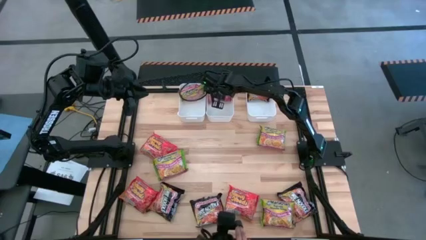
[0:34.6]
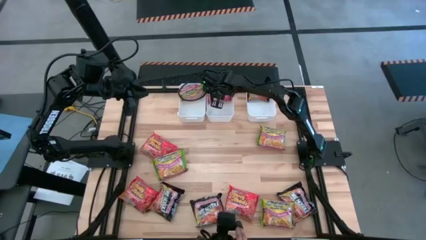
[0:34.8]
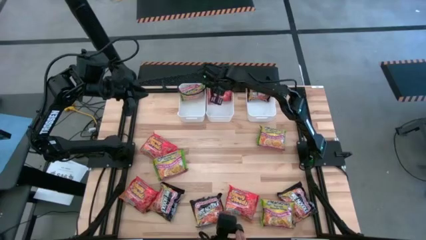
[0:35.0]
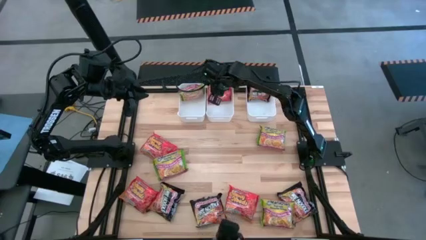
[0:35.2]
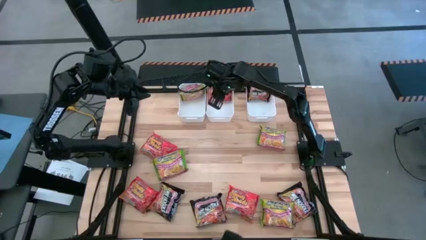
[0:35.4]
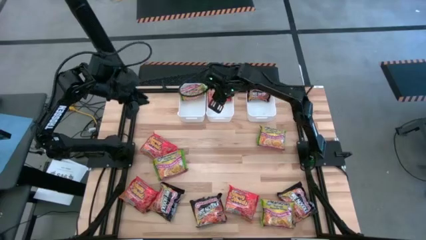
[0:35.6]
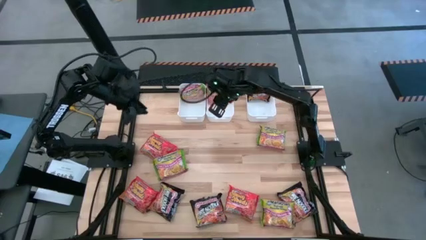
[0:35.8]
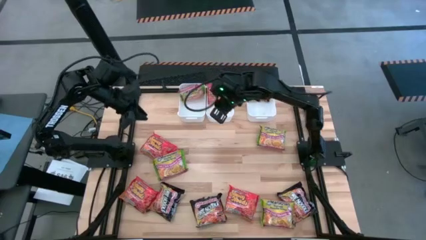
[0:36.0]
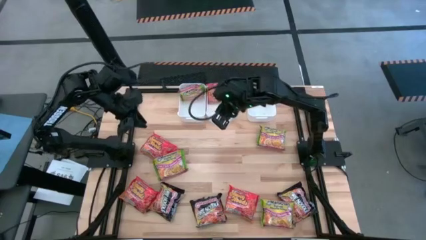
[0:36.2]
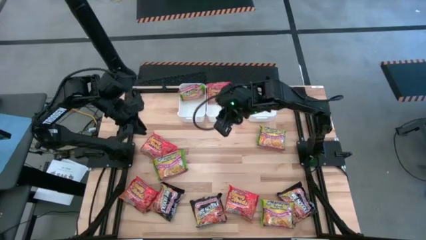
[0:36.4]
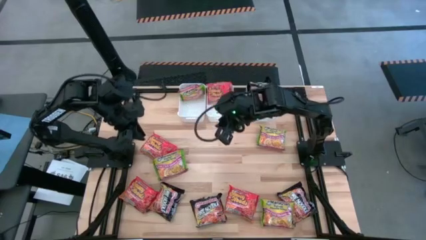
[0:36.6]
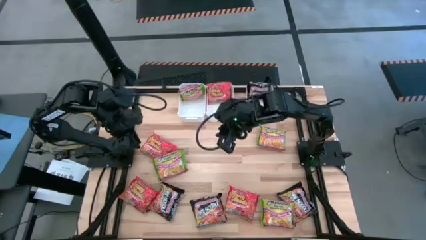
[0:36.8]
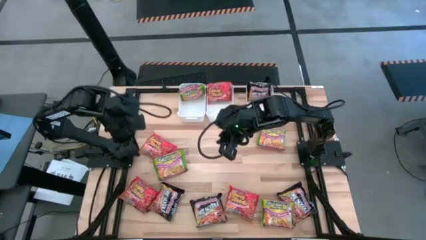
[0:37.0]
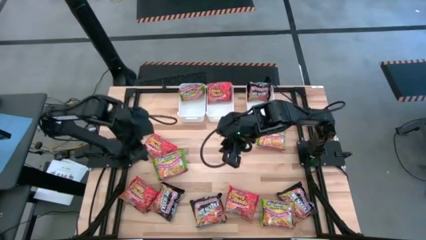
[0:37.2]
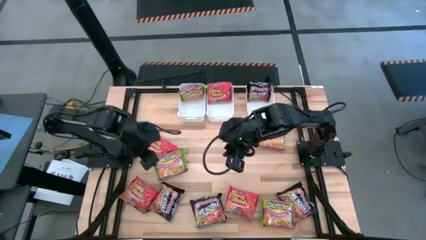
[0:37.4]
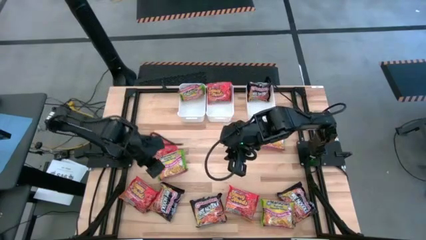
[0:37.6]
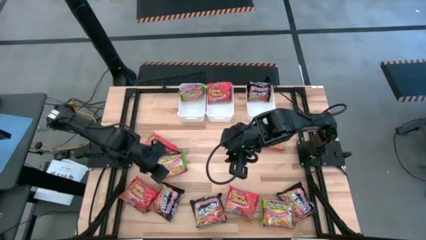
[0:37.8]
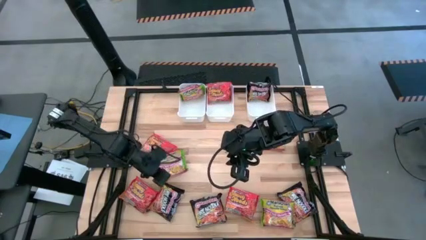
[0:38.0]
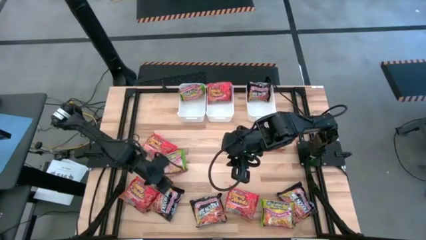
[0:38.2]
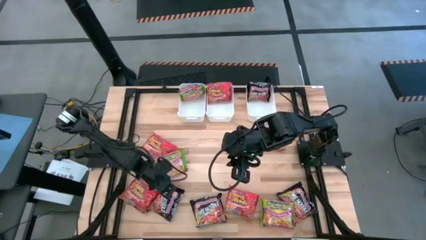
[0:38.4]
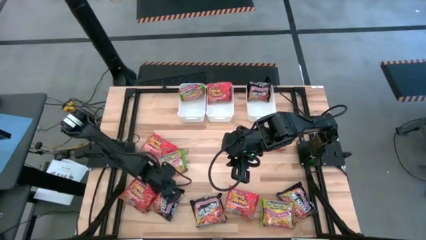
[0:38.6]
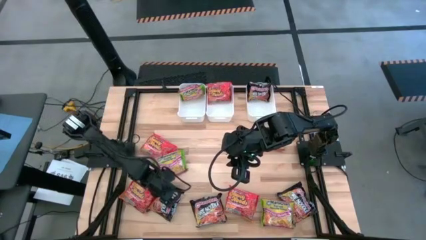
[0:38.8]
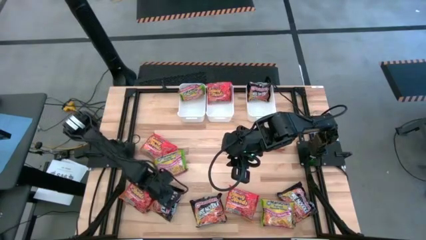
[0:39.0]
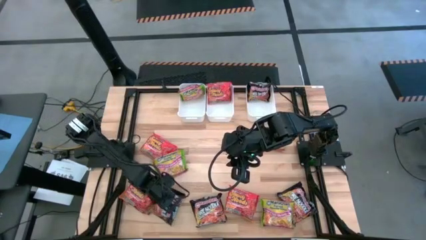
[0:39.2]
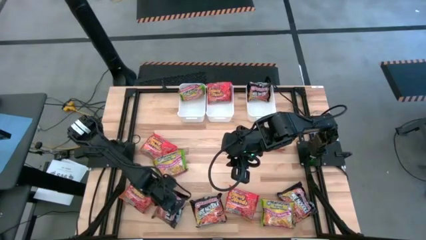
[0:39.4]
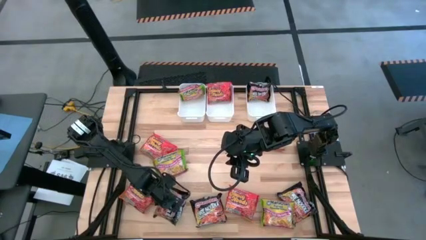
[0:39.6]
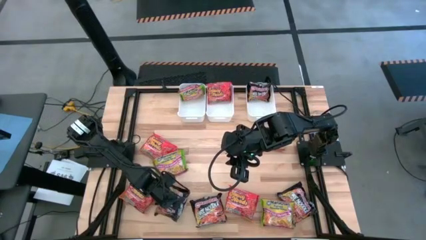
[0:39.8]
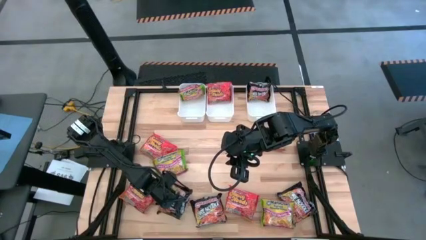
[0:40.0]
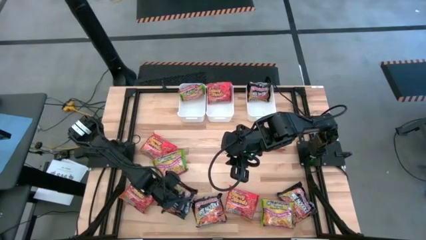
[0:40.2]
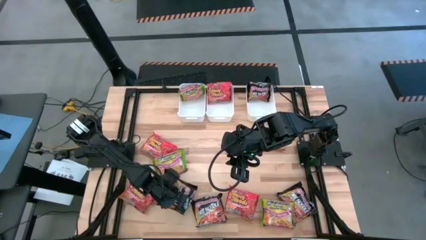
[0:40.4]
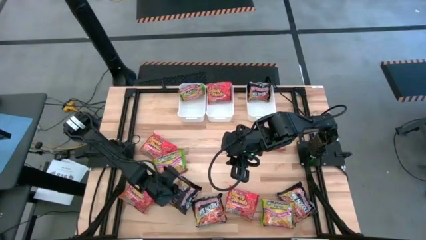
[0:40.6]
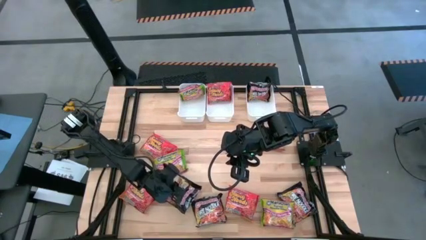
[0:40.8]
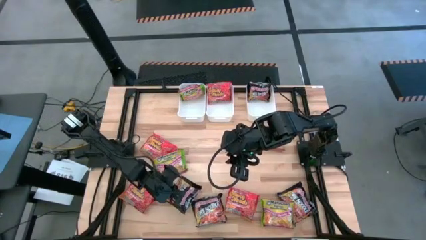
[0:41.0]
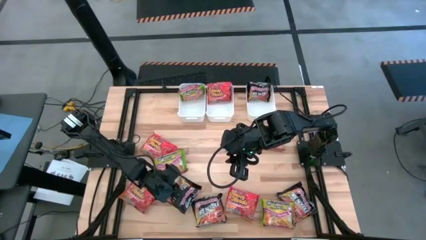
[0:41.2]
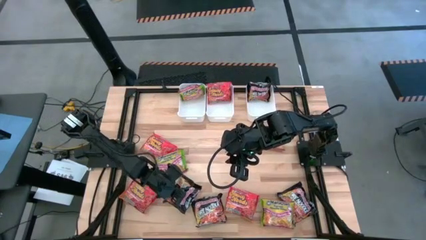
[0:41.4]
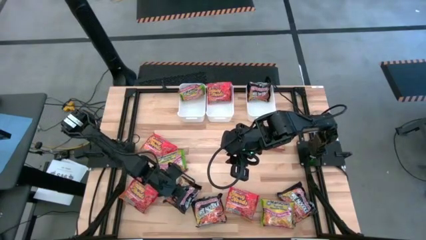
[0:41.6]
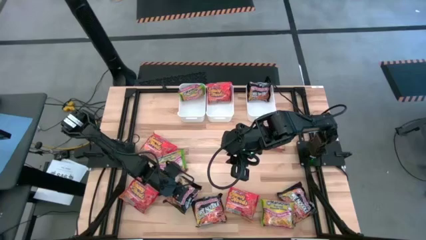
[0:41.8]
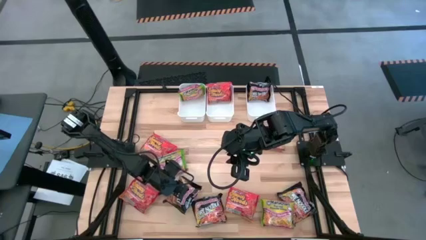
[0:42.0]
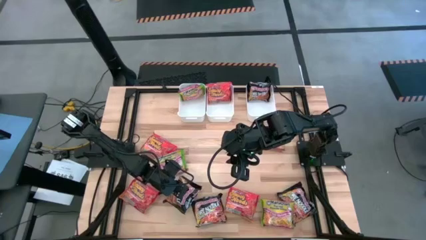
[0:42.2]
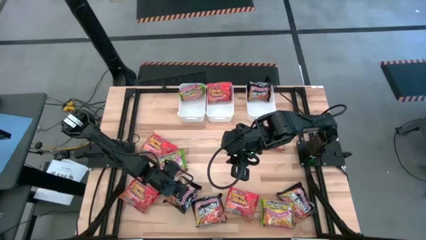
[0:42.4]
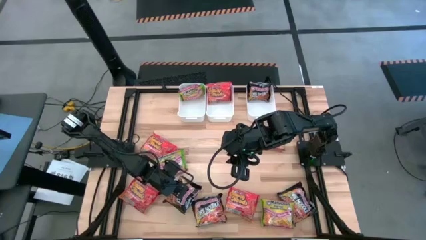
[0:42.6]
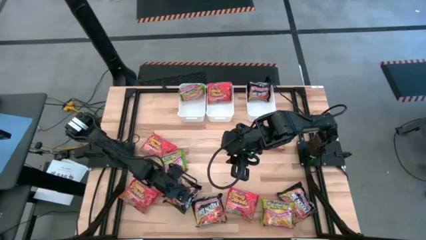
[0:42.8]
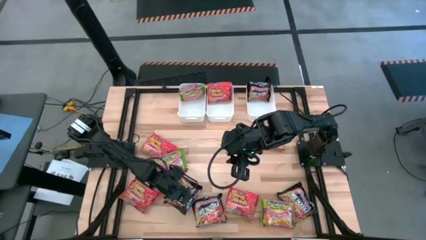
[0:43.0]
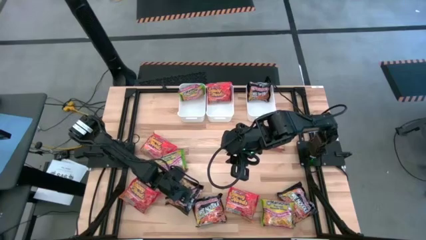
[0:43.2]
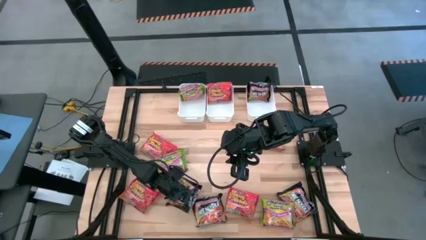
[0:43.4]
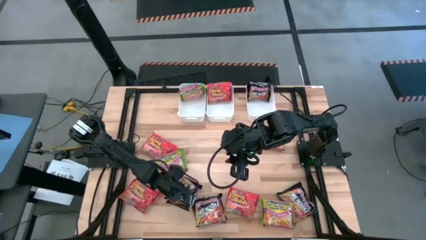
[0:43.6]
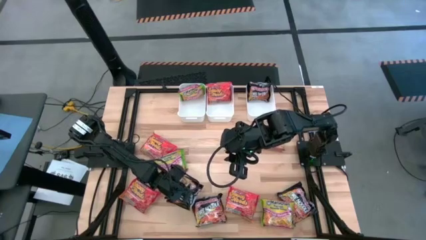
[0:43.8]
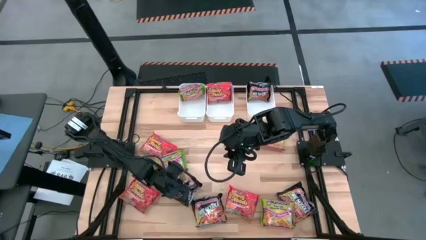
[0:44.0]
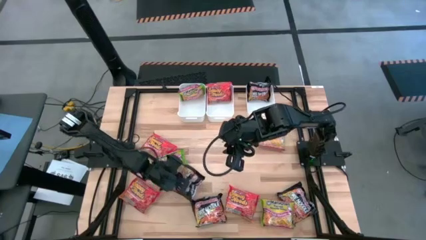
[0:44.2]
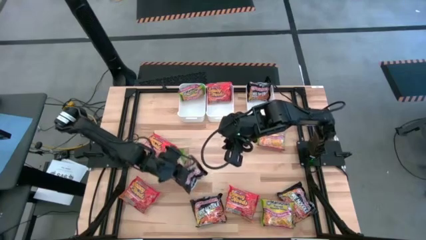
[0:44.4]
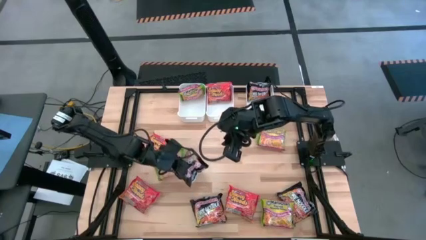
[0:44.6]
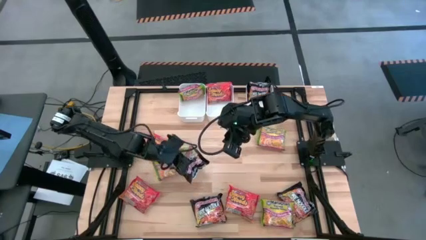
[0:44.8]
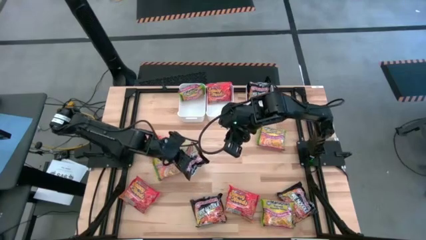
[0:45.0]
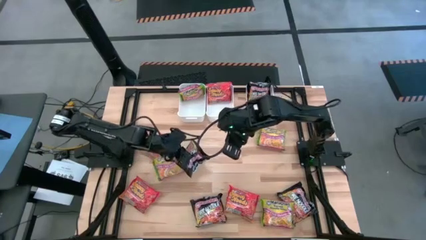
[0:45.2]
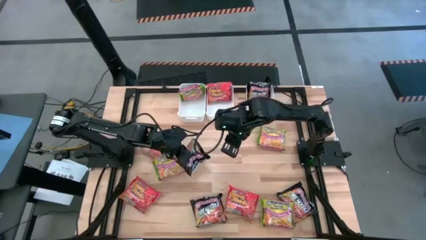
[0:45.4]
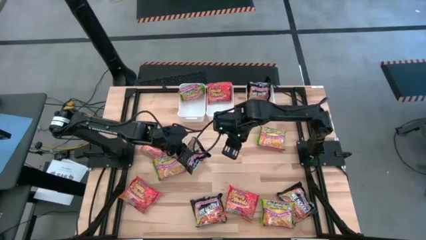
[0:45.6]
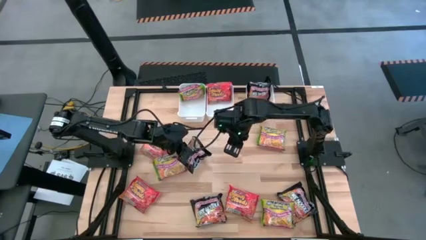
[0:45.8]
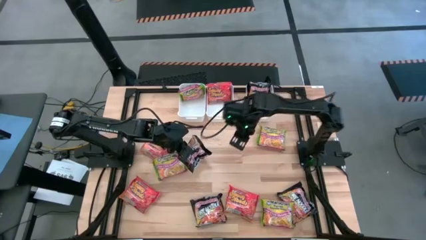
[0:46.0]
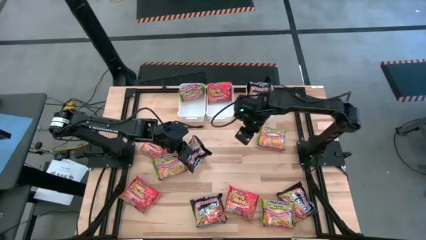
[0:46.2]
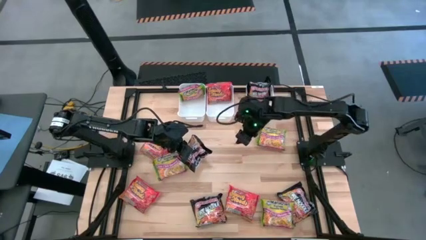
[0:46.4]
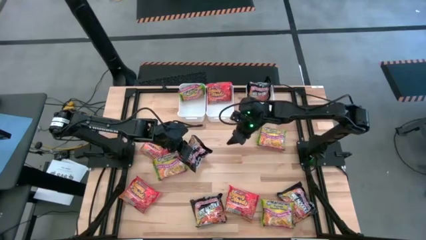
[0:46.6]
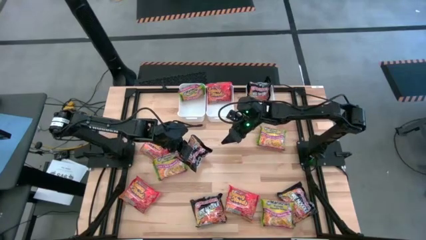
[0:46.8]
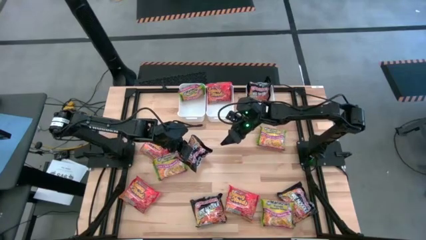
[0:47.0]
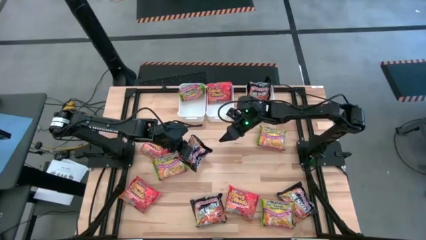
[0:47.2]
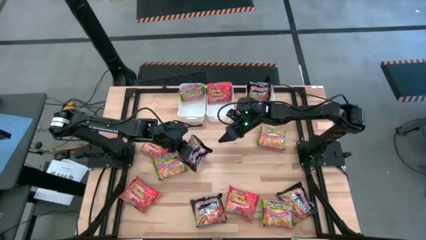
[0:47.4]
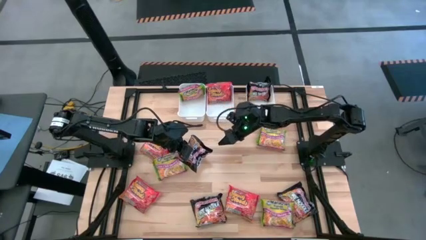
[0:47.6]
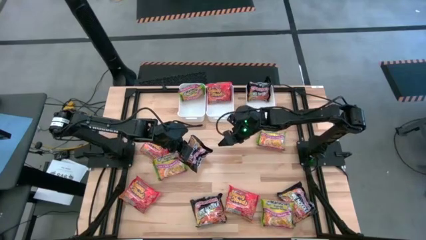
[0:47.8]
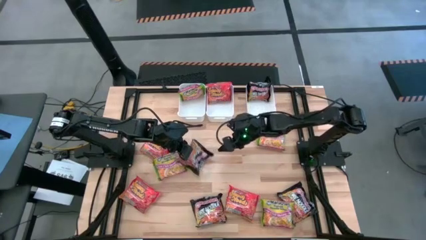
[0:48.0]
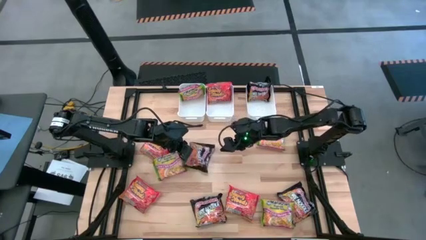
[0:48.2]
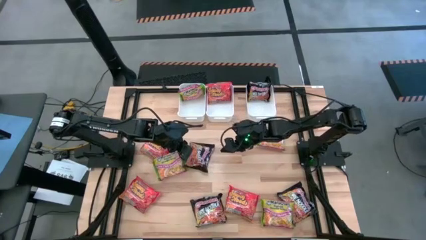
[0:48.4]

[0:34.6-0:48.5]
Task: Sort Maruchan noodles
Put the black noodle pack into the right white bin

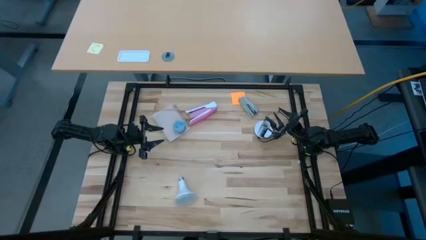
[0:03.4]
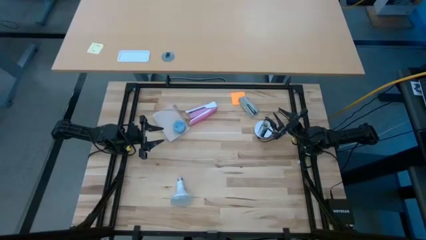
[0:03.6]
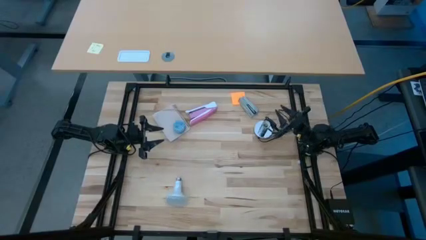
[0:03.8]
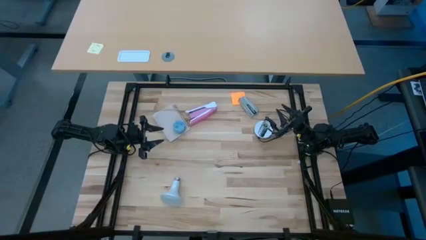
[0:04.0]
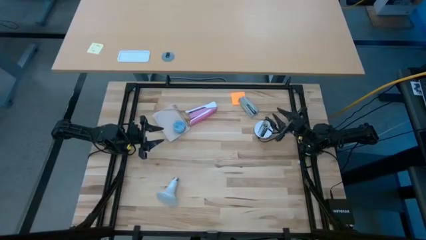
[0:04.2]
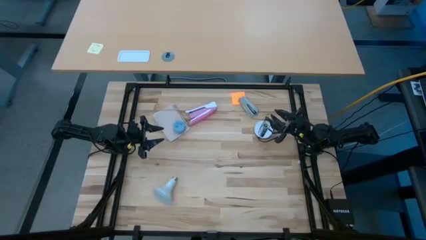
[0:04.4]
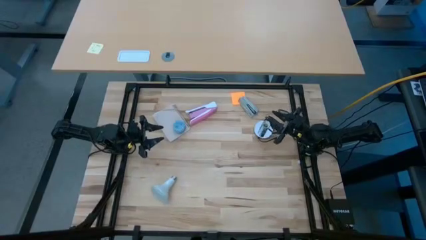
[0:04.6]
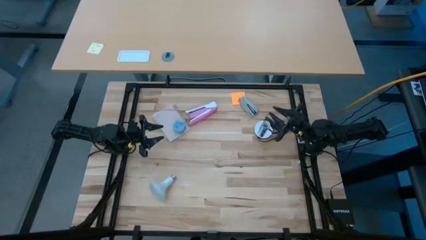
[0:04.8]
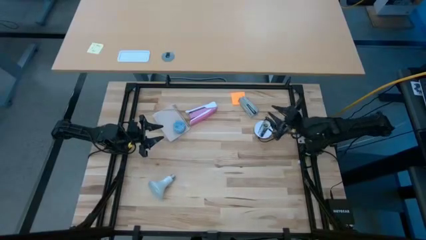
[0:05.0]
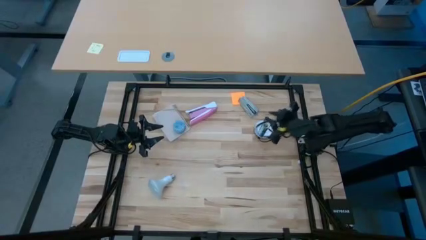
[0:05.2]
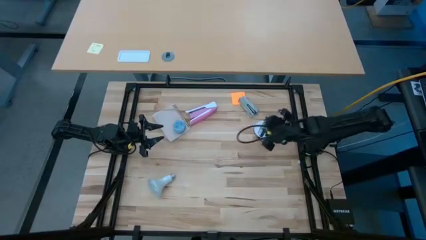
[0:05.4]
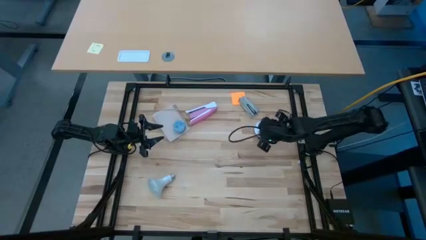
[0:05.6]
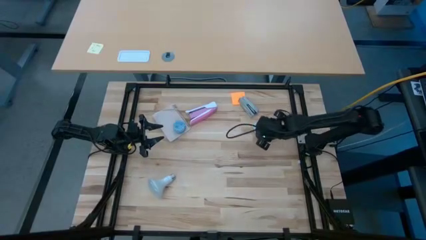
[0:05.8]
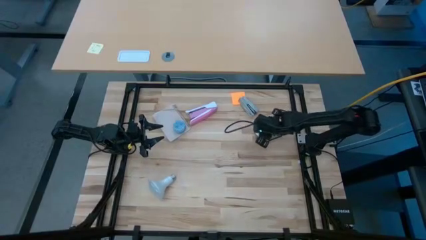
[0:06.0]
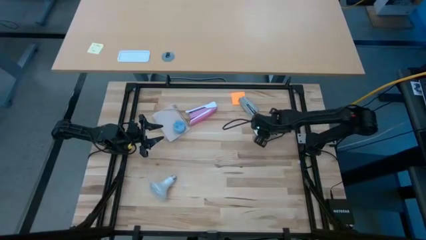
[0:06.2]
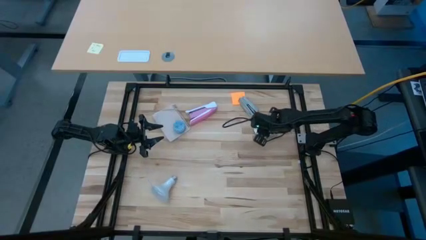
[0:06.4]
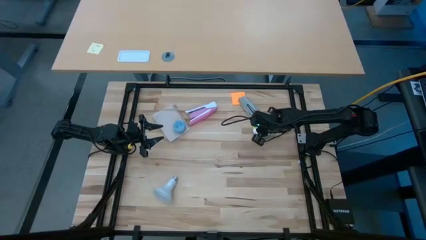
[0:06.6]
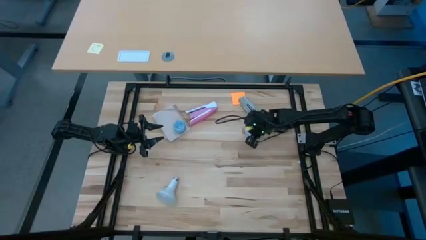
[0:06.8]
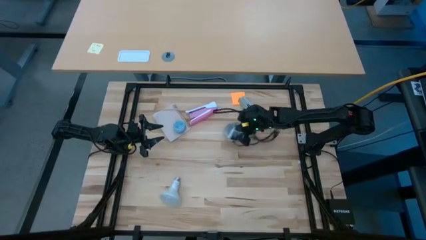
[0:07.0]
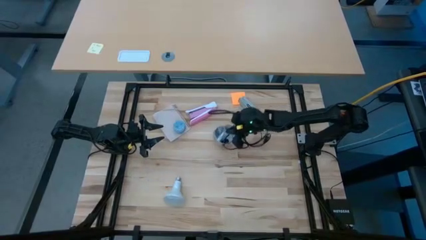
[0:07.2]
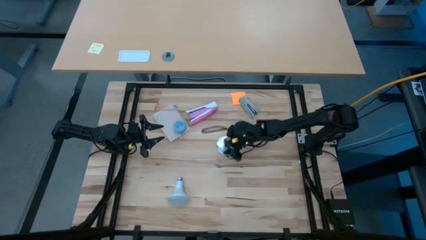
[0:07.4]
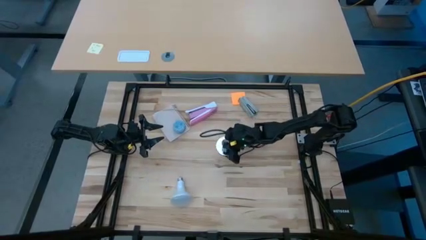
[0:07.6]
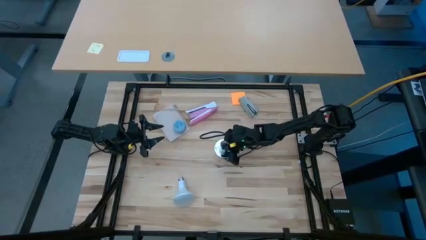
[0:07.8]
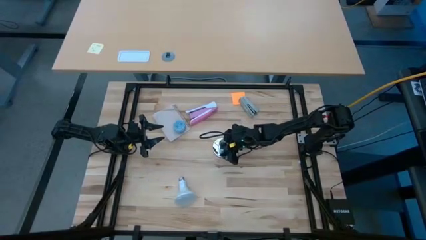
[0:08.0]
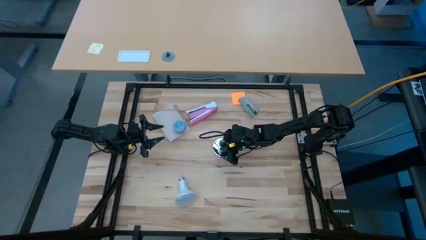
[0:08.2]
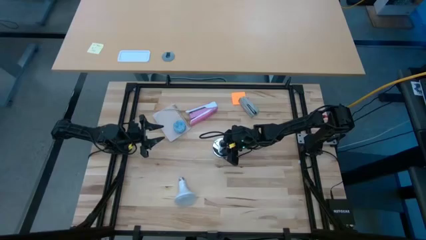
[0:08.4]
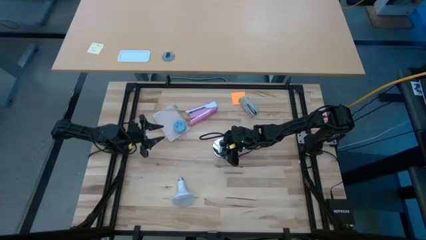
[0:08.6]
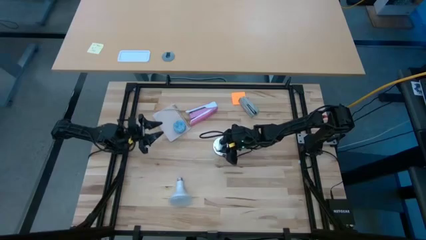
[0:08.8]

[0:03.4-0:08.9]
Task: Screw lightbulb
Move the silver desk lamp to the center of the table
